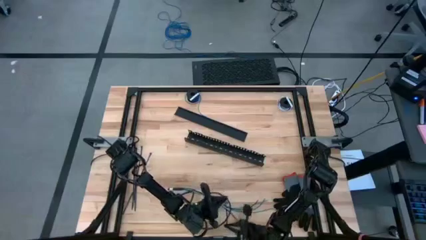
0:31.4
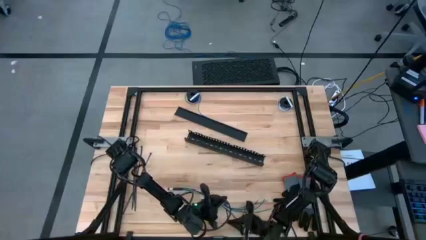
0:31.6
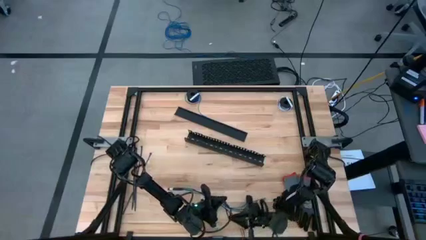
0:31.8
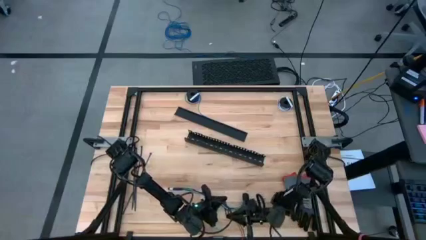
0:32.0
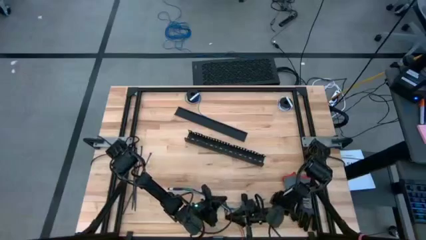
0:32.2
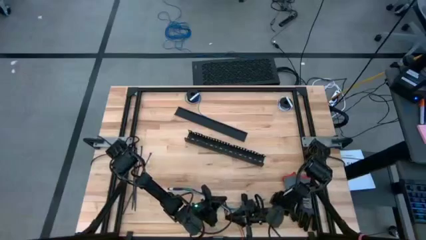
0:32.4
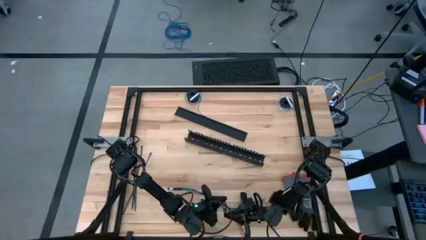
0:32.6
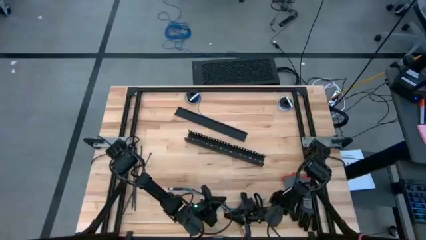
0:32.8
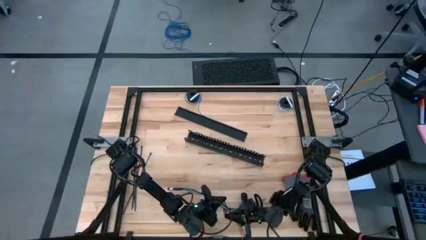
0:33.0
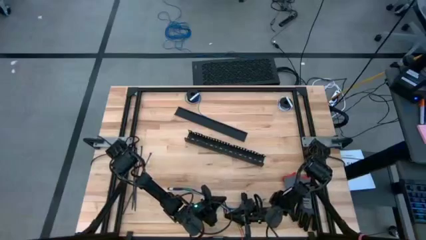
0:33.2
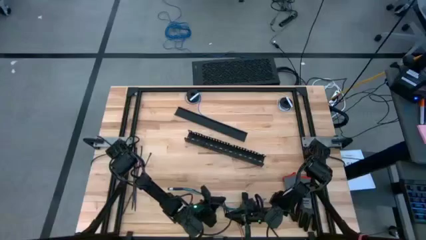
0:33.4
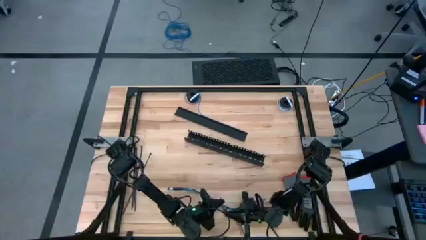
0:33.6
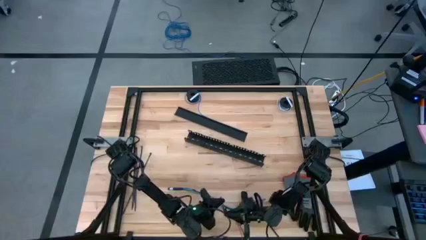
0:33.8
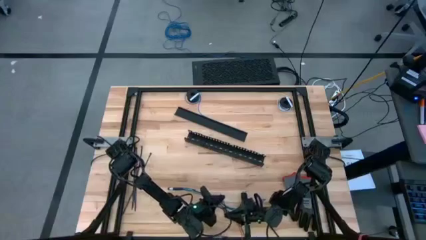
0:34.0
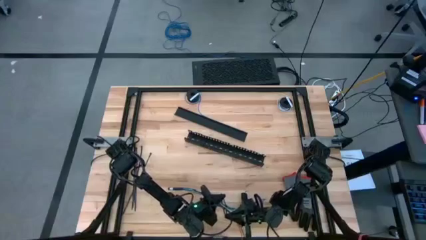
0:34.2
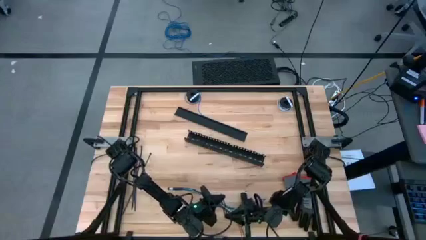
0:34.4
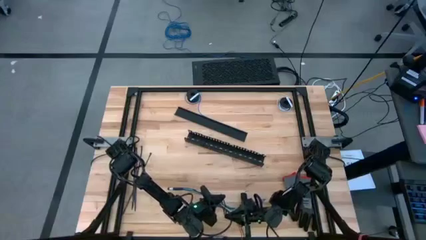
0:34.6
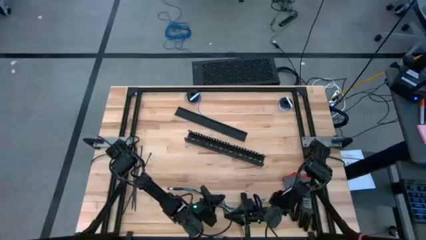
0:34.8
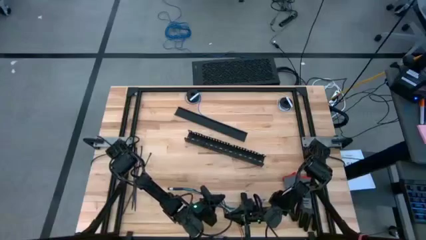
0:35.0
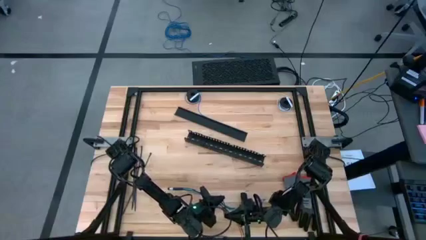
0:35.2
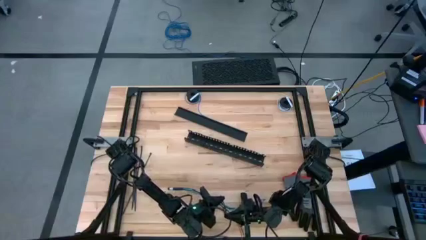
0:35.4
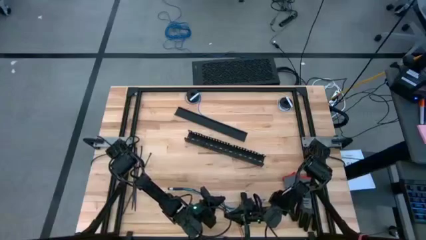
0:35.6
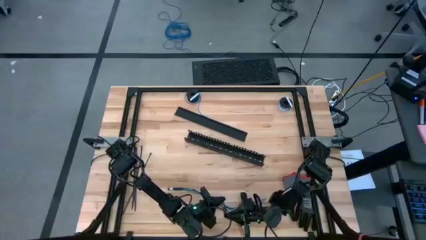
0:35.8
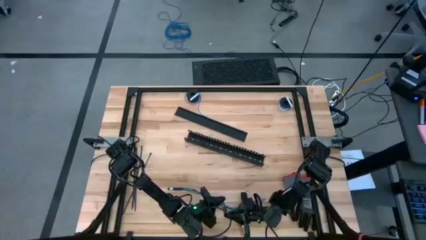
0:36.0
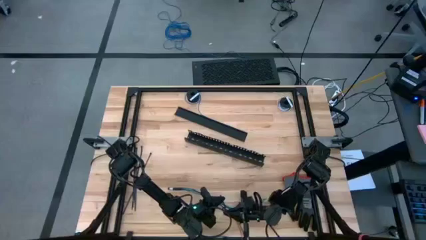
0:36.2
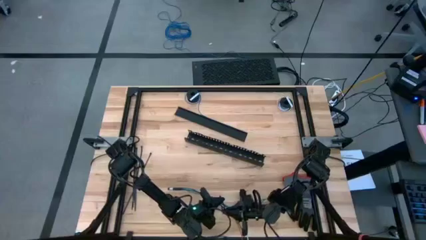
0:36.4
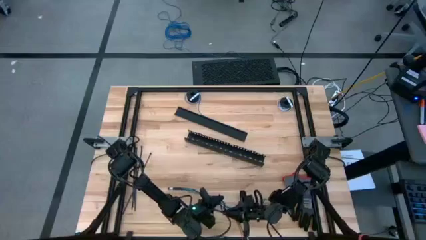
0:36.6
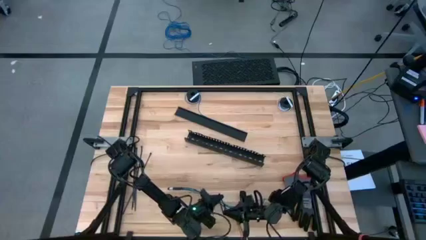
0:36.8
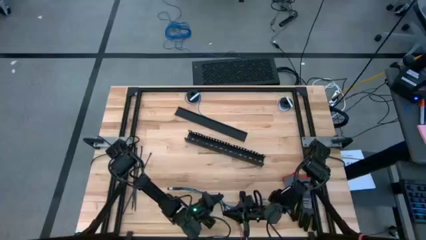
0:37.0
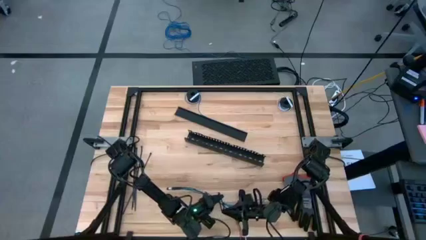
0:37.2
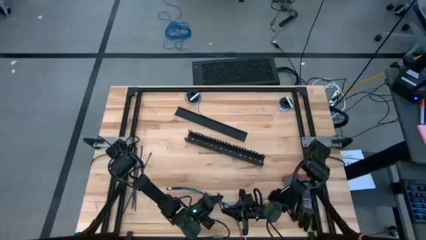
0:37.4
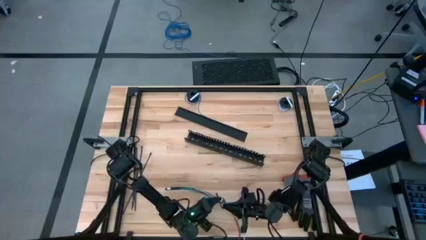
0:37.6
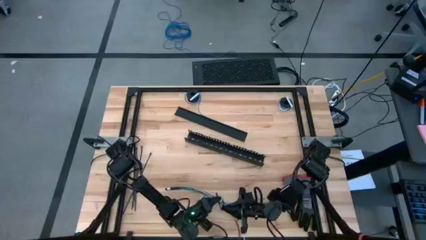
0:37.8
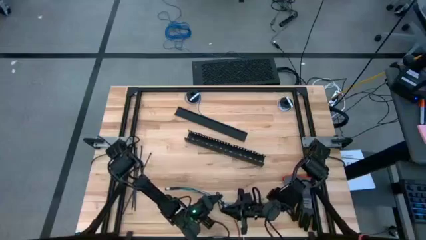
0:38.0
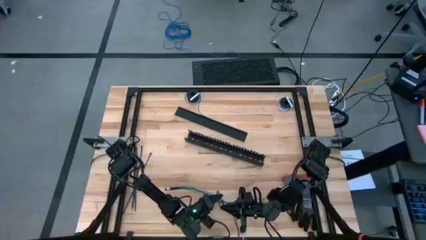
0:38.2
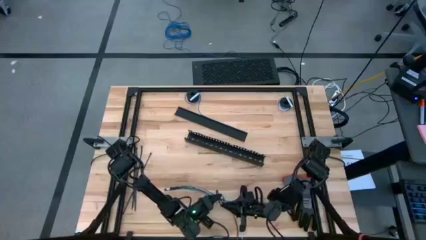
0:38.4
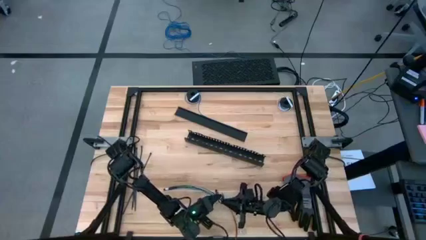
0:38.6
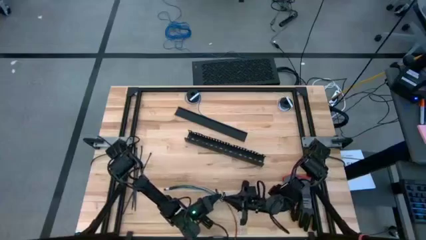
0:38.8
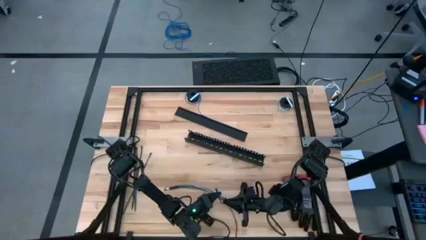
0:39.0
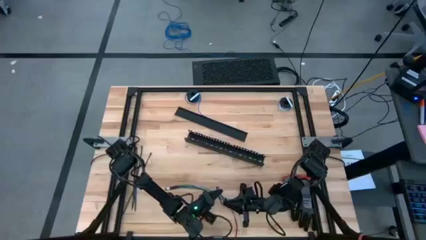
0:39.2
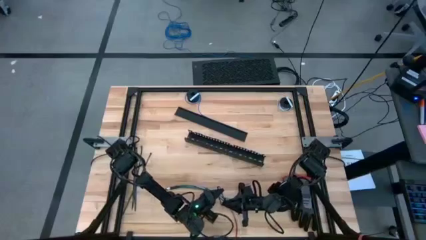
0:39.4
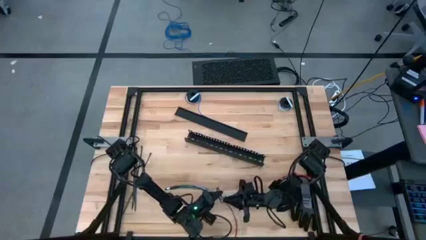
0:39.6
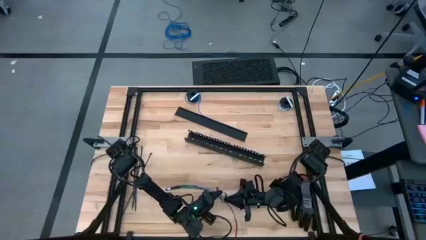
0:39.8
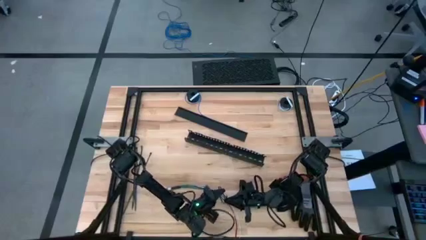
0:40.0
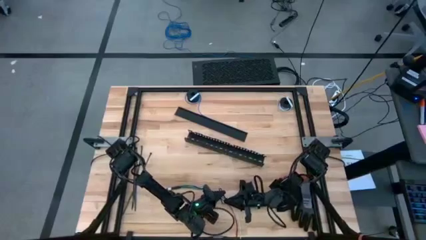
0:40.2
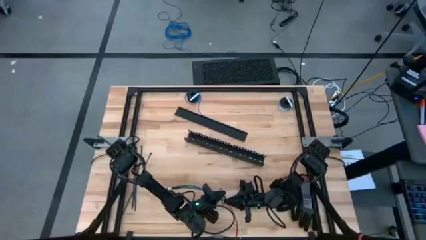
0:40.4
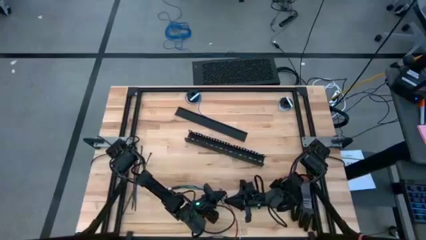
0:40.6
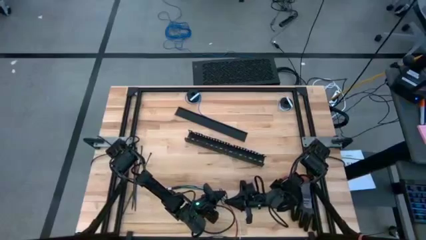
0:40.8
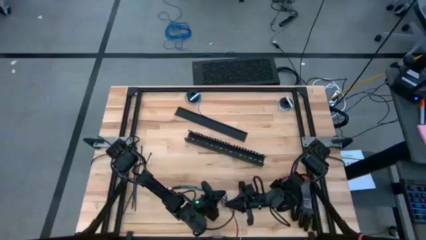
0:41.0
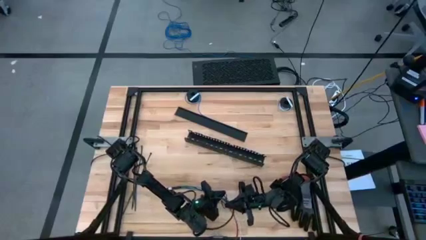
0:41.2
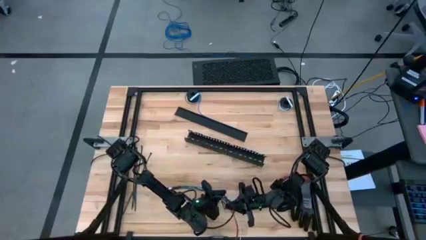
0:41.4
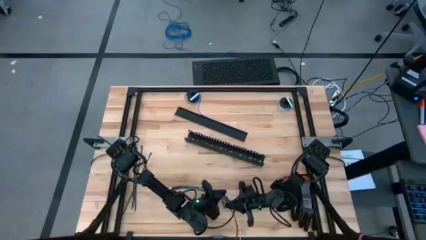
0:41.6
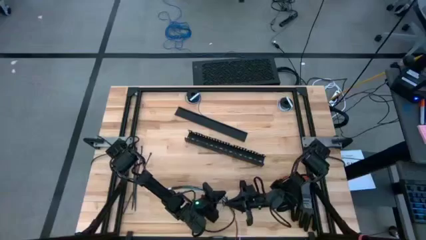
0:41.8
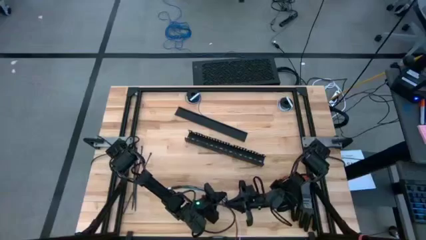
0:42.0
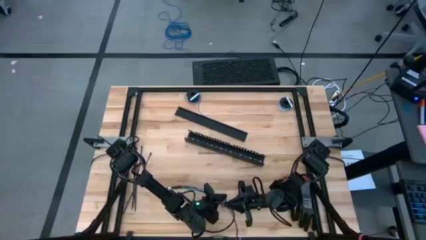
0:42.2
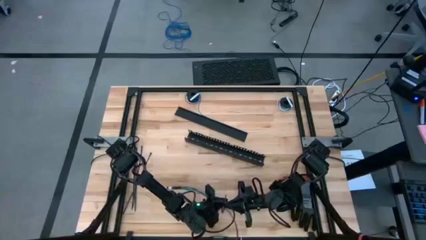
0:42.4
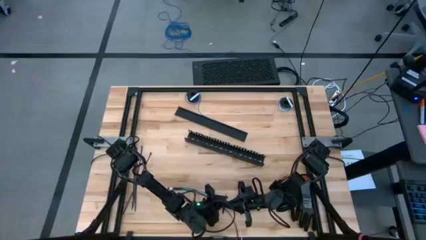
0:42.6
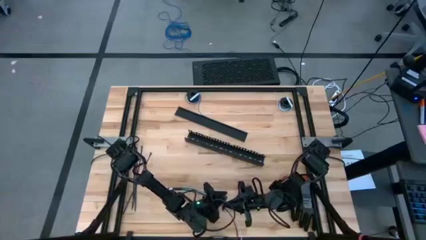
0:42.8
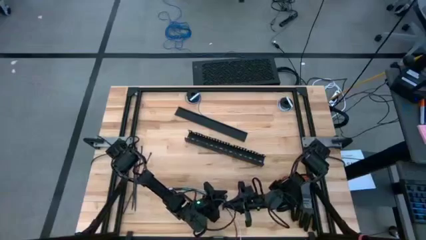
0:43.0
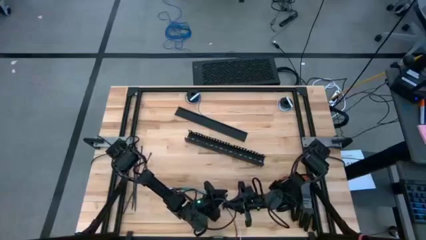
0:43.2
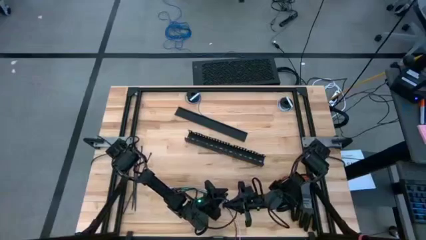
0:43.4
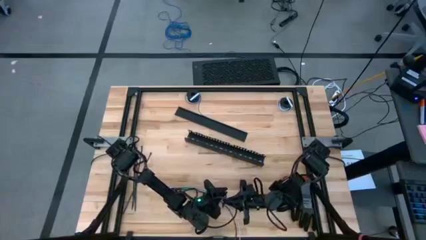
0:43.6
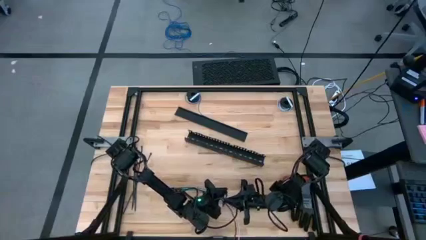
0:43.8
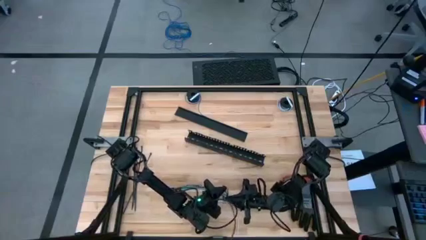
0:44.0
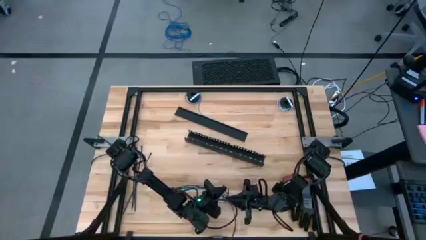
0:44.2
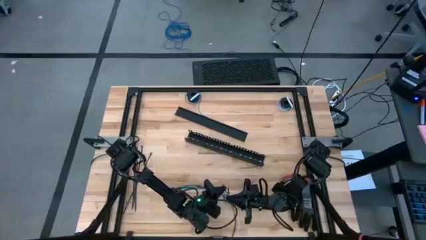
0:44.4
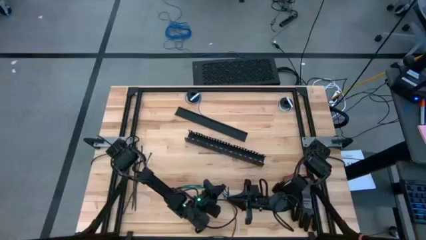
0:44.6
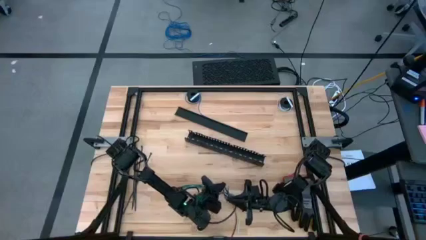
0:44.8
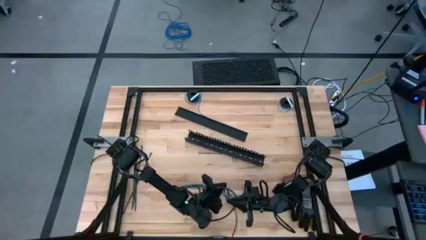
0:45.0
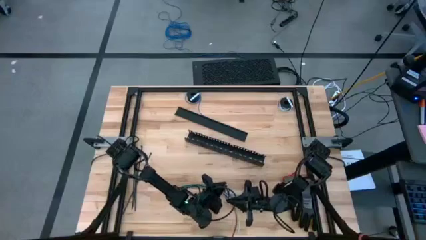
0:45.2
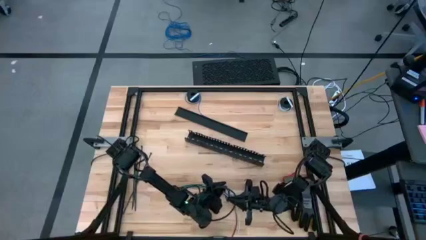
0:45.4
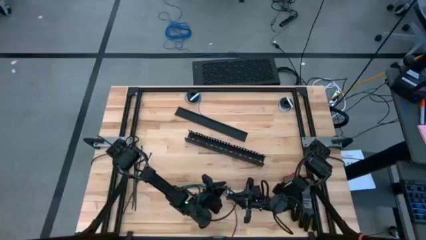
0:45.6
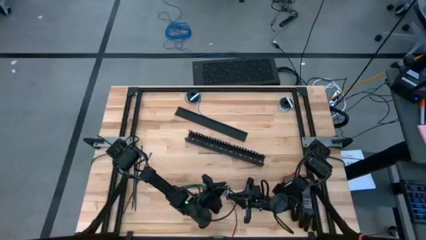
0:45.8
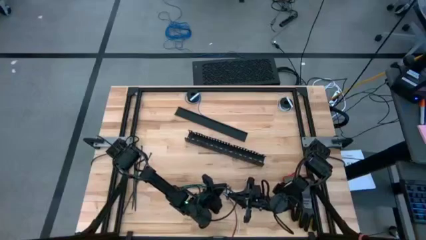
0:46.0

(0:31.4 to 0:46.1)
Task: Ziptie cables
Wrap the cable wires with the black zip tie
